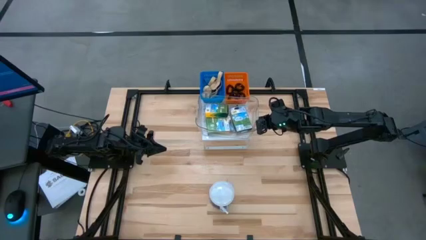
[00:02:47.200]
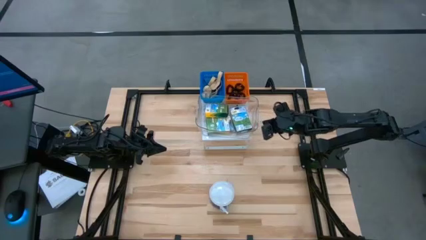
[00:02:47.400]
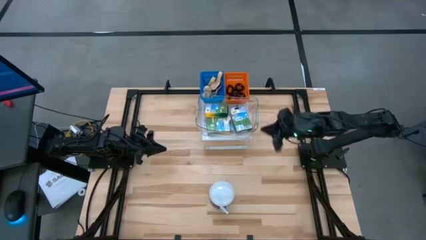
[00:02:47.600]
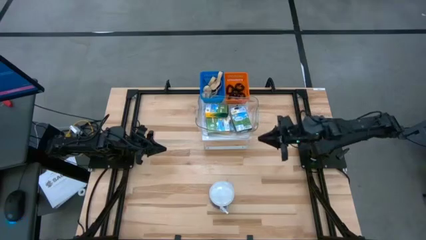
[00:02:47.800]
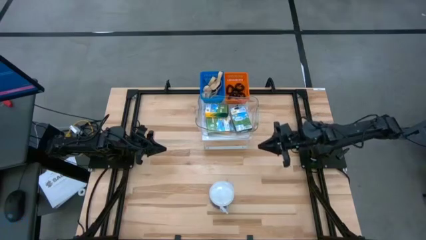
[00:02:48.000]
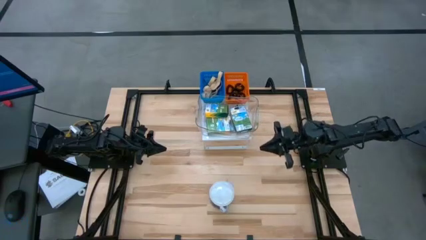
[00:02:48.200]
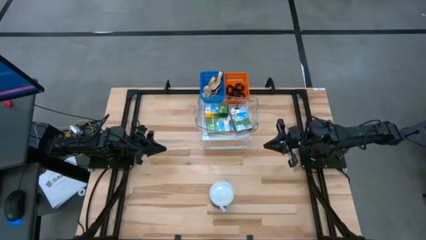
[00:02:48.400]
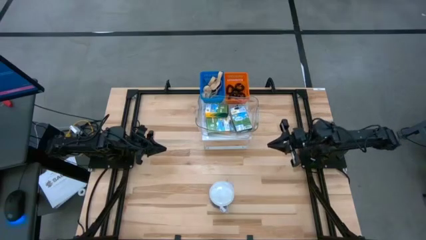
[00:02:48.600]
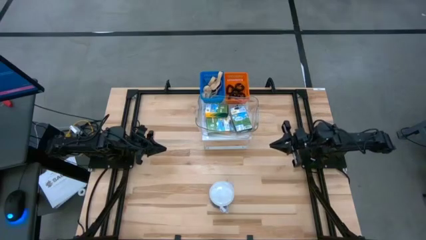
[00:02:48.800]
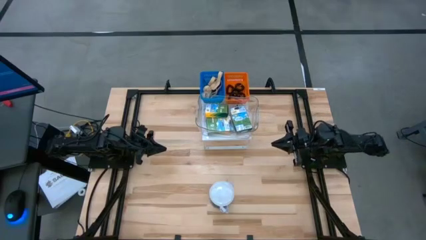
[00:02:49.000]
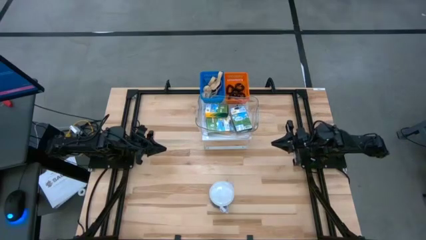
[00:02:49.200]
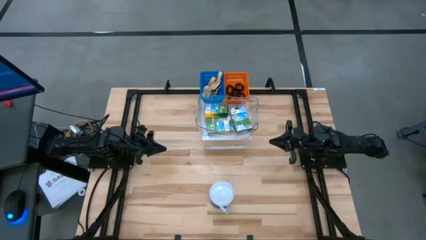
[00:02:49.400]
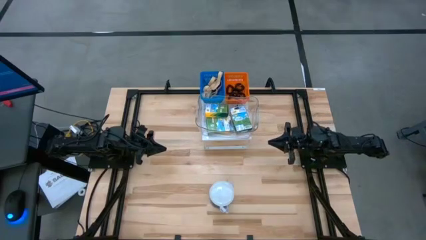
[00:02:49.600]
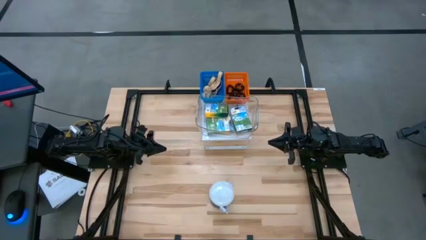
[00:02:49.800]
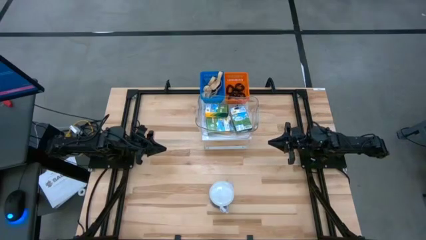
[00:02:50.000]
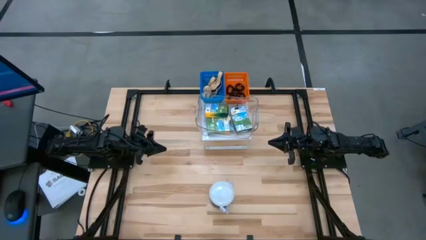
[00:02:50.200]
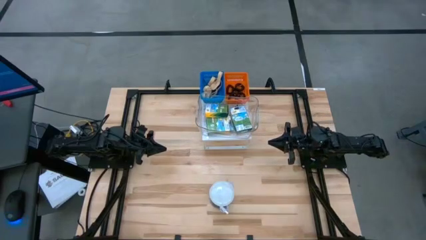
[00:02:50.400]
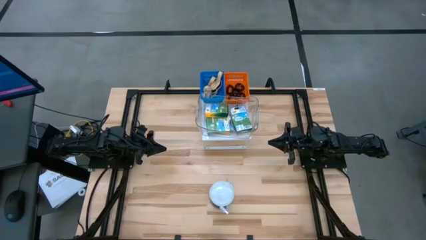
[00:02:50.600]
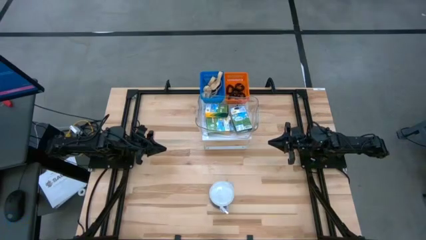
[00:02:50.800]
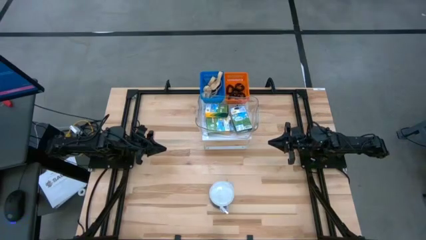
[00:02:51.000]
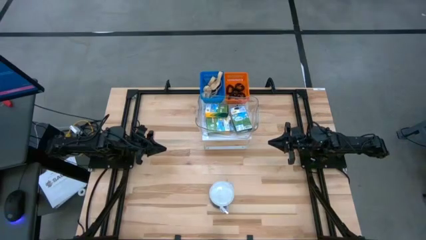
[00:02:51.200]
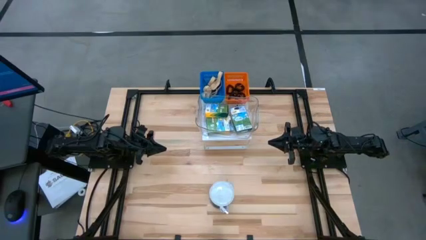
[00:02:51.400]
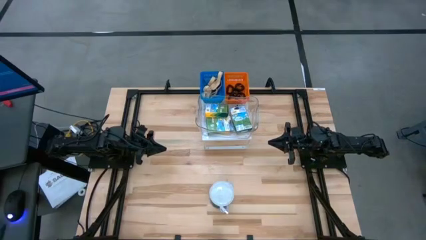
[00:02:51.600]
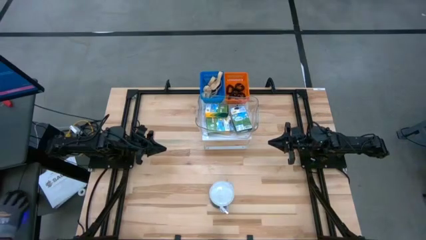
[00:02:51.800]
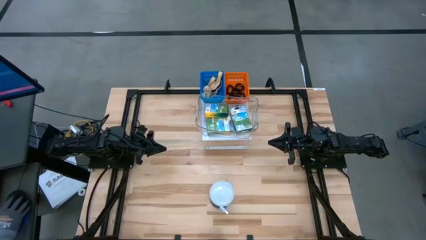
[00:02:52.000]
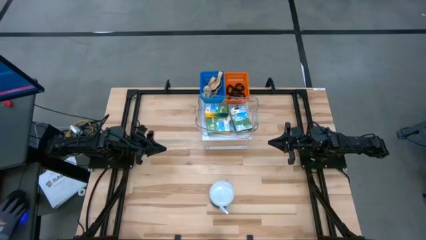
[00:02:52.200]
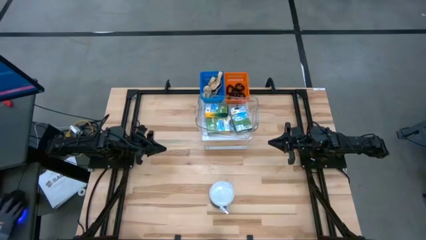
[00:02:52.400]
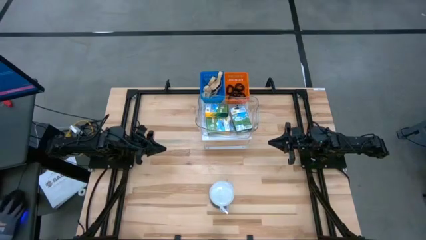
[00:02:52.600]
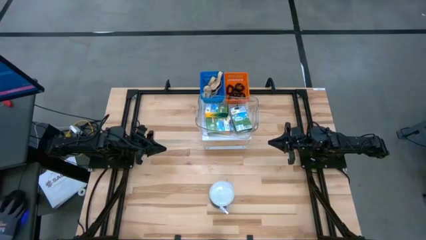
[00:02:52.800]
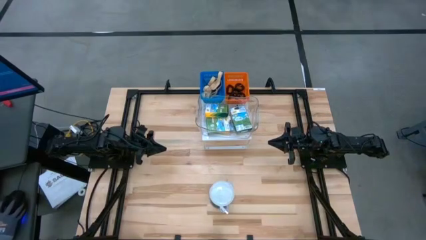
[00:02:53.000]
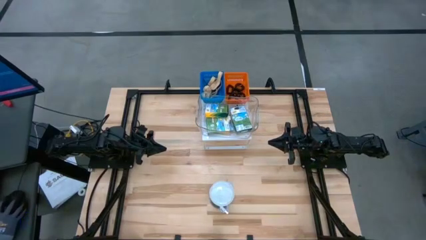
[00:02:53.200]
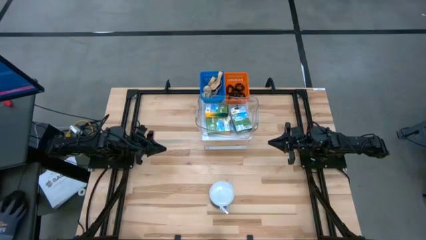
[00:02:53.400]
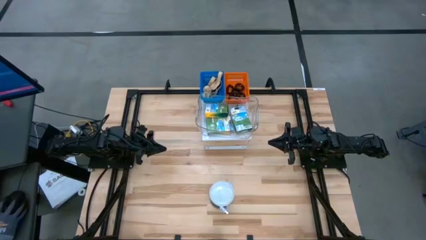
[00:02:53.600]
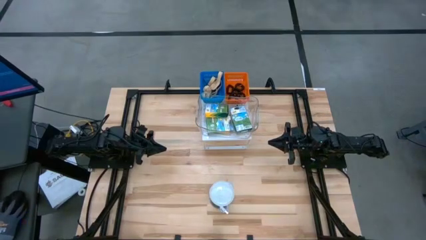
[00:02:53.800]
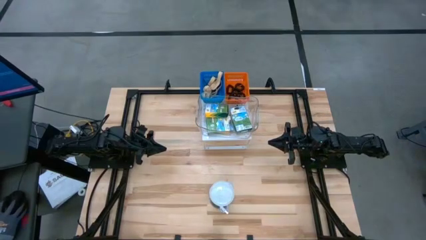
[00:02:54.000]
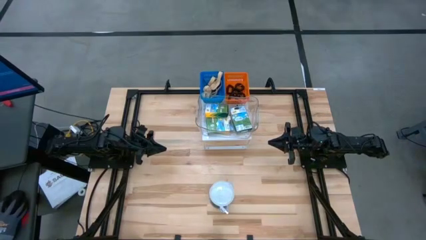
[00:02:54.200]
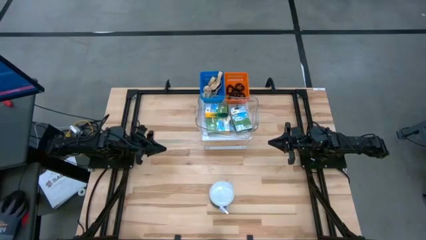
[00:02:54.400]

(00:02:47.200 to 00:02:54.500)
Task: Pick & Place Office Desk Supplies
Return to Home Position

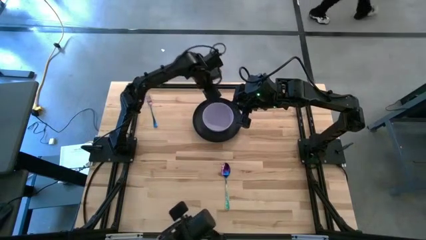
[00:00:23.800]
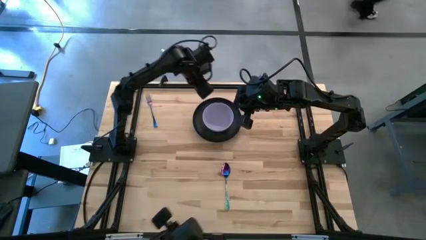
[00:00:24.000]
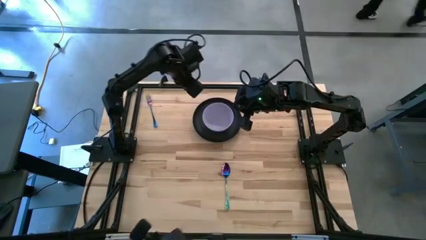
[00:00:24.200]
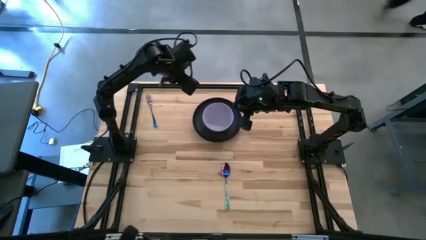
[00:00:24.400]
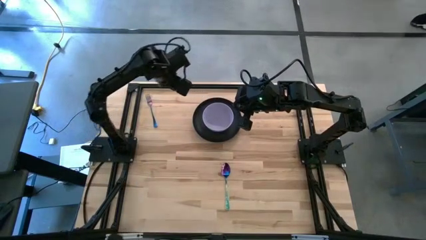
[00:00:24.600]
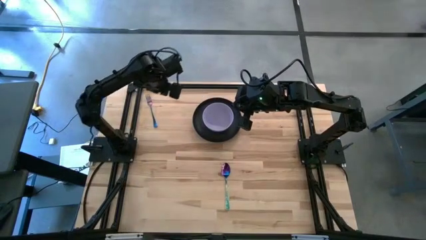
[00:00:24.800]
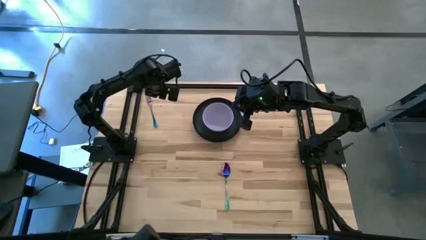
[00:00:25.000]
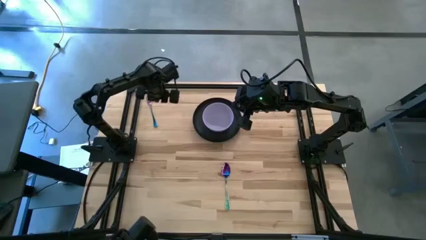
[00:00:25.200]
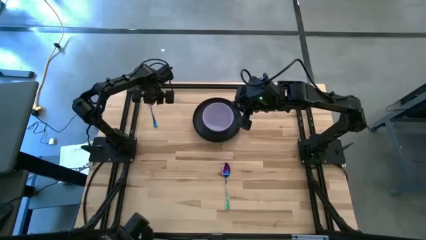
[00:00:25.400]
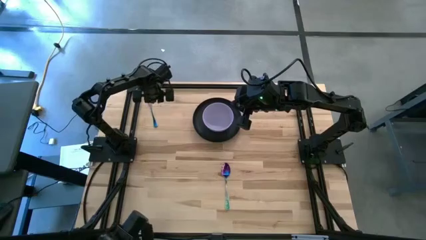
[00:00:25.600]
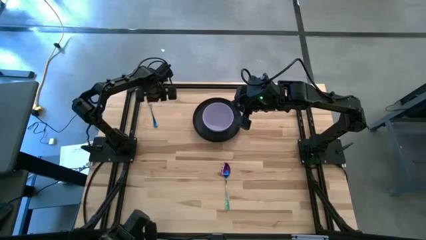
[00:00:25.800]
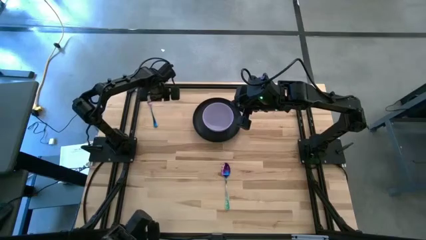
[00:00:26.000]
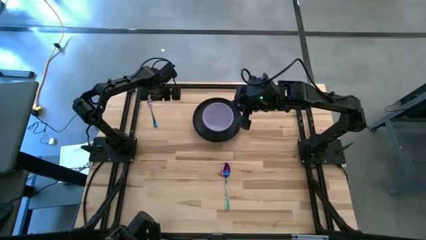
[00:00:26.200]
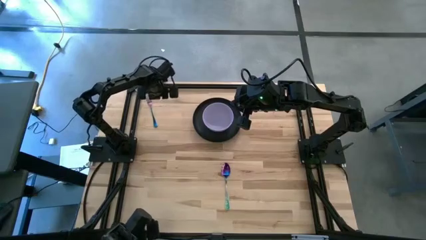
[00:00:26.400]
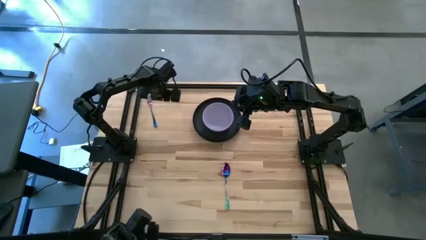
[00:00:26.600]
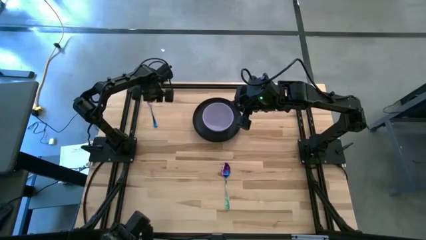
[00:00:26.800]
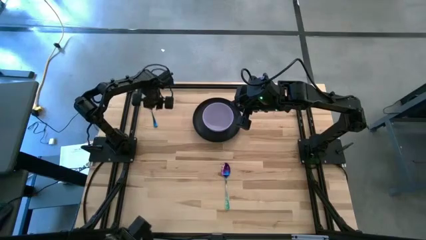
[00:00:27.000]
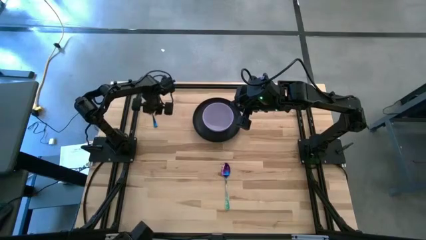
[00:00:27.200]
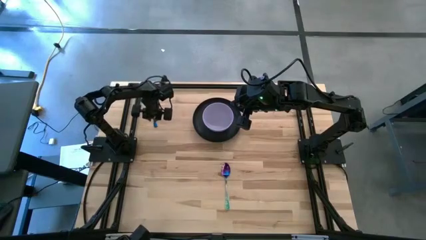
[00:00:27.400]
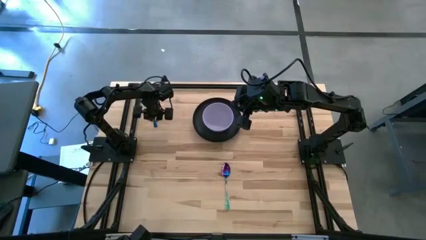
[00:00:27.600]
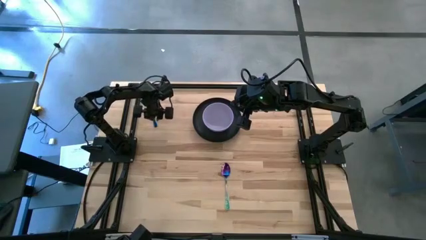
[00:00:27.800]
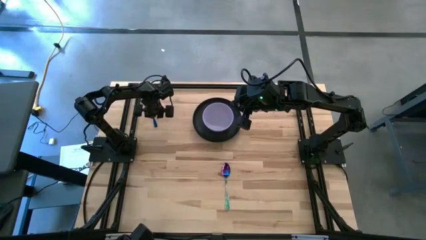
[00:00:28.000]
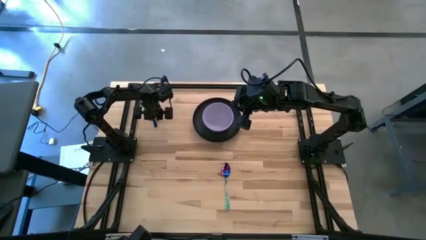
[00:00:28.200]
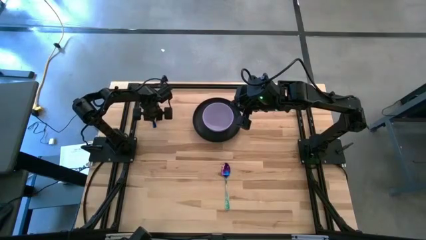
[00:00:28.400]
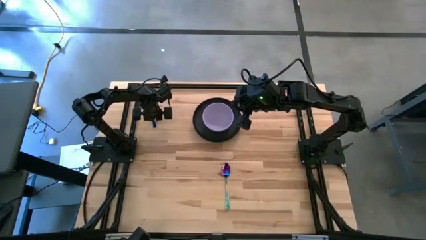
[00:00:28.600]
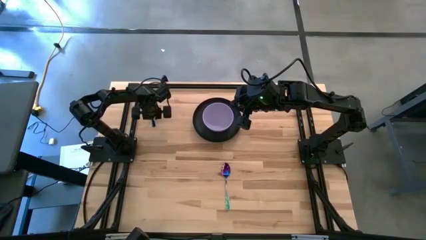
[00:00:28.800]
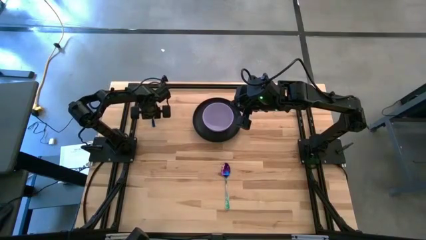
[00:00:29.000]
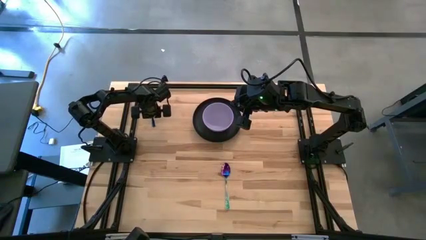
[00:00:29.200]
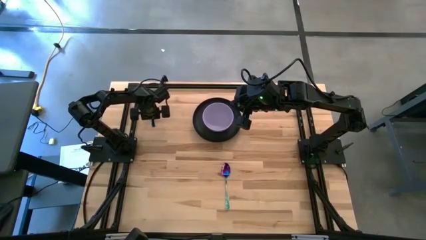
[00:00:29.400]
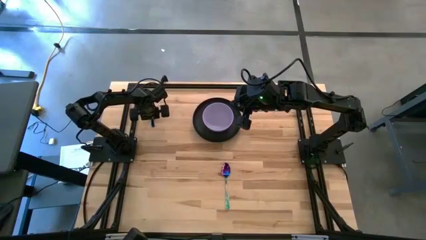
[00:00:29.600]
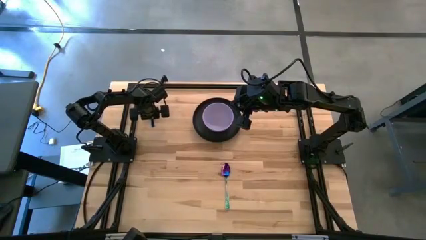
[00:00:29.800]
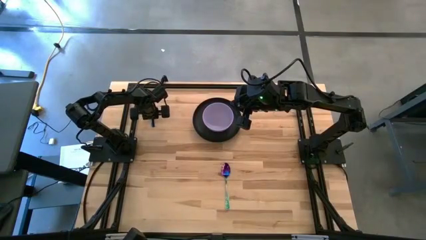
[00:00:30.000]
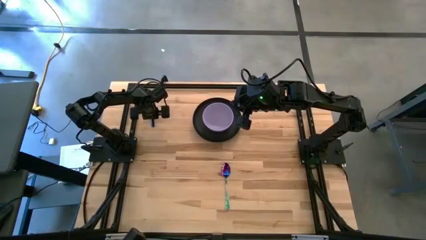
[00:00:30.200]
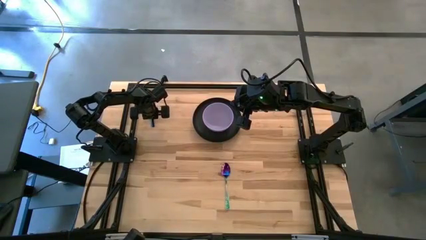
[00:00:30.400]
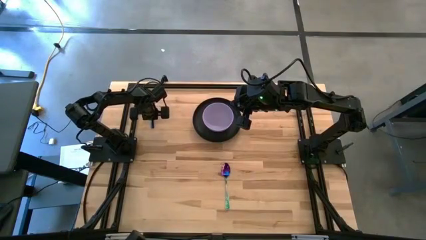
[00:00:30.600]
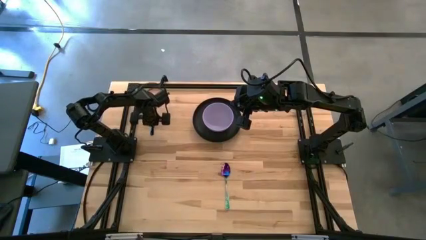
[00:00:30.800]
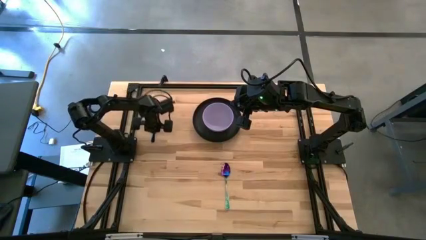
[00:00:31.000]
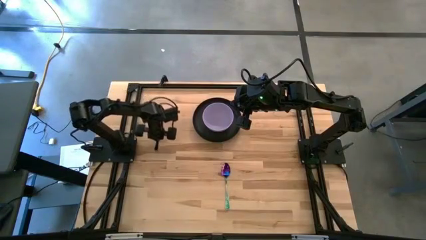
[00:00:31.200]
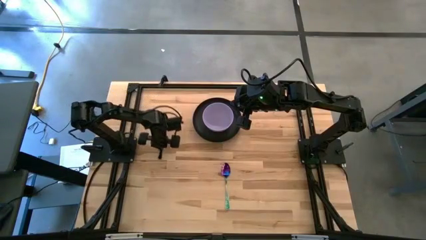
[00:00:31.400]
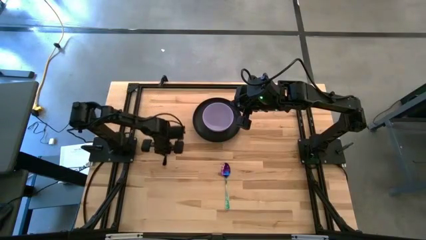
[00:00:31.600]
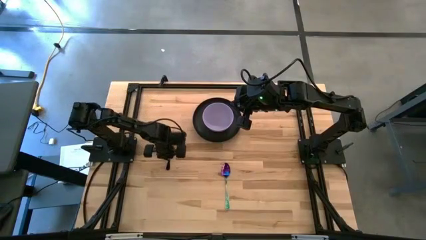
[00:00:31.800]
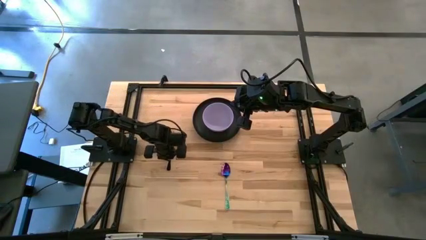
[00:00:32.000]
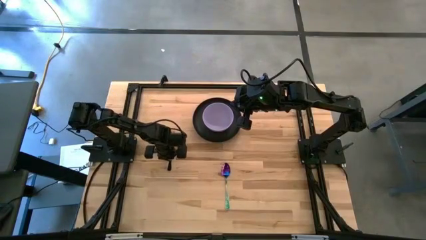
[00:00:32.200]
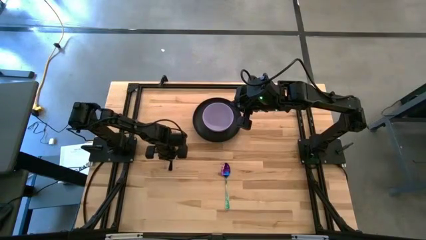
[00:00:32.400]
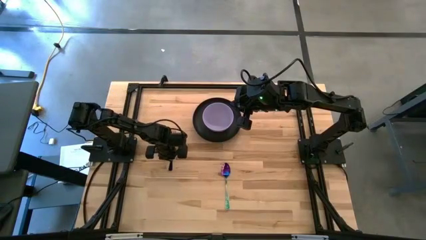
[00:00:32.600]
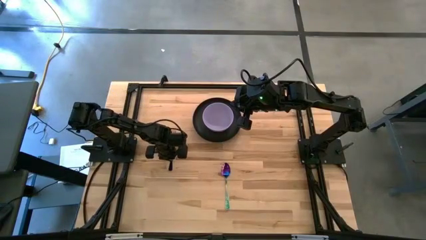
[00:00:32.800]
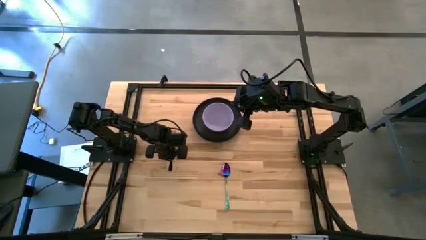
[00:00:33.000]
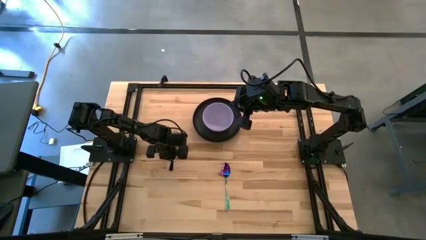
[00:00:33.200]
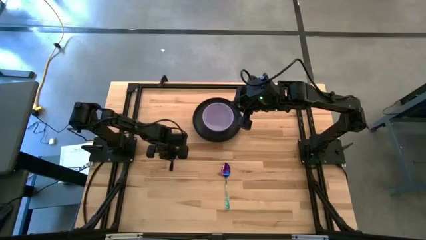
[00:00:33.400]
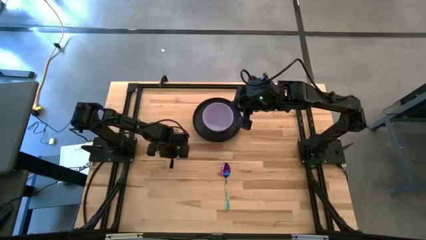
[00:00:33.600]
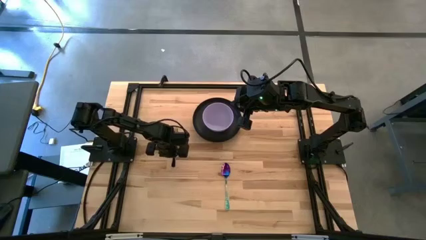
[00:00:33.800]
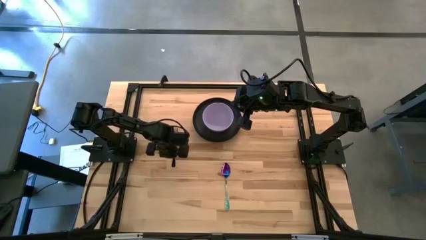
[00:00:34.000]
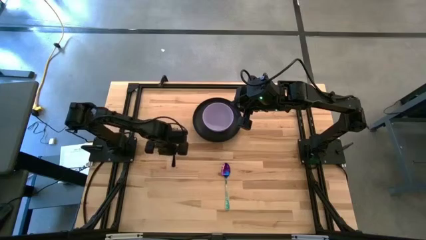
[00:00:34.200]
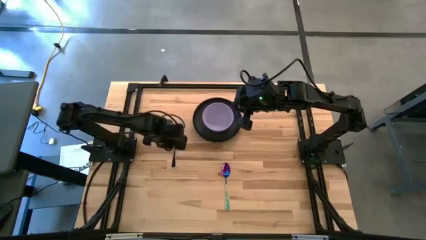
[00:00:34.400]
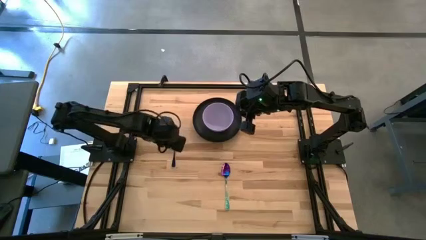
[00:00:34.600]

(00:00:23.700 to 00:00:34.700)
Task: Set table place
Move the dark purple fork to the middle left of the table
